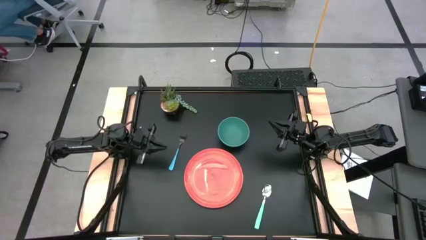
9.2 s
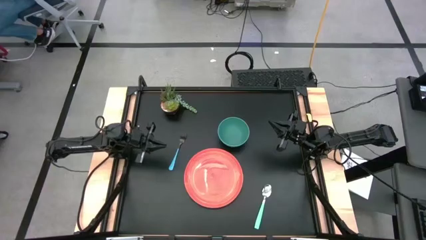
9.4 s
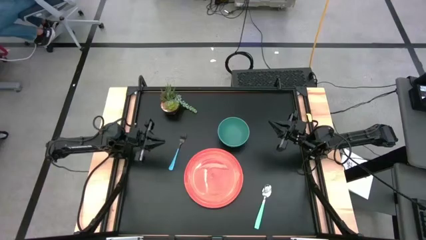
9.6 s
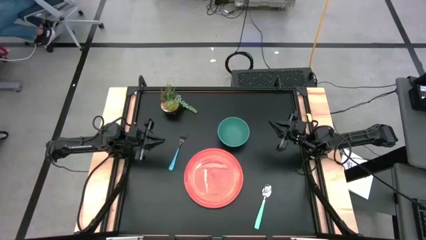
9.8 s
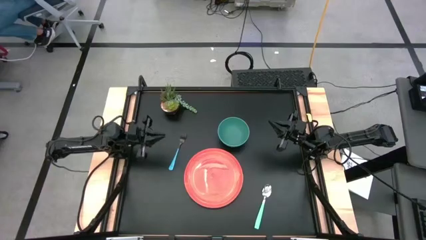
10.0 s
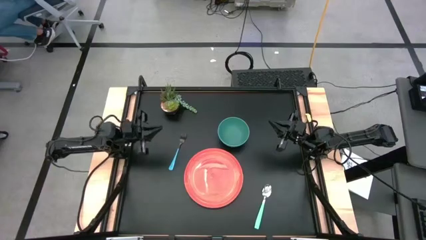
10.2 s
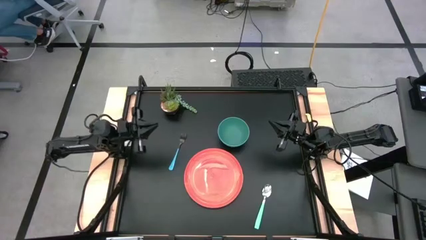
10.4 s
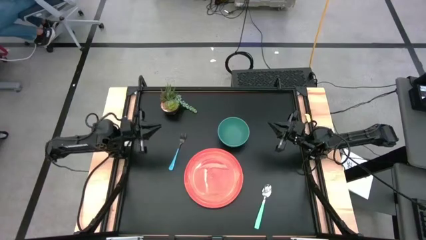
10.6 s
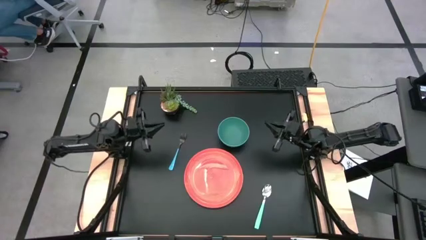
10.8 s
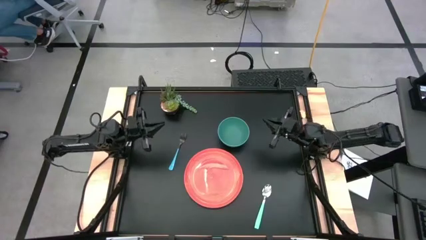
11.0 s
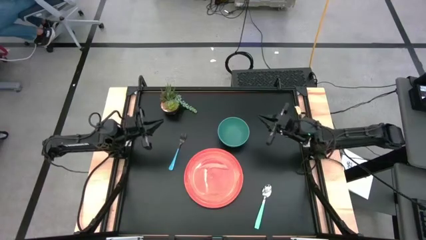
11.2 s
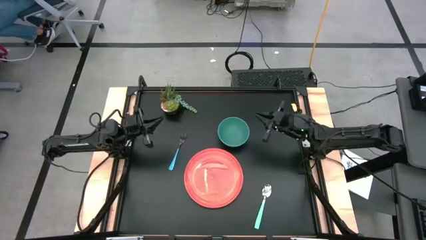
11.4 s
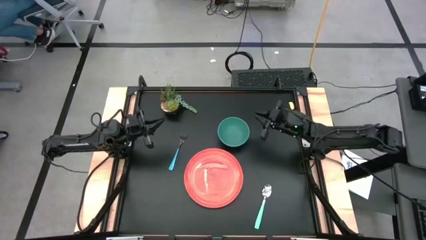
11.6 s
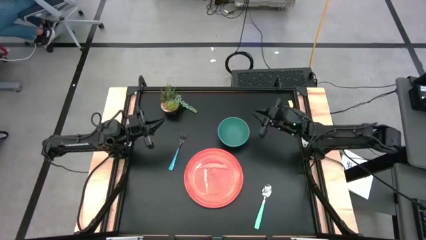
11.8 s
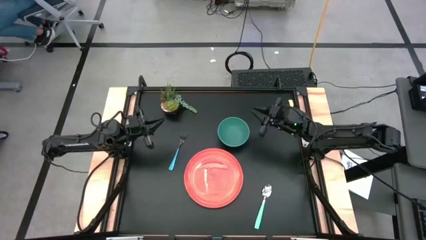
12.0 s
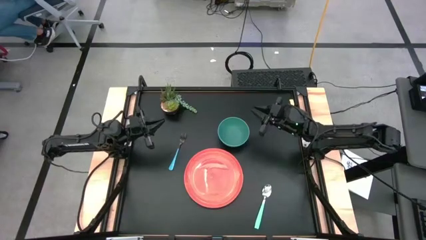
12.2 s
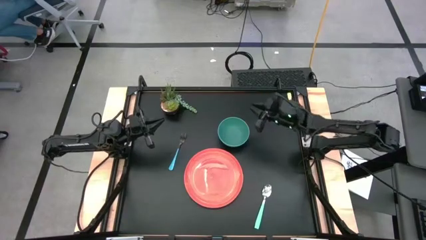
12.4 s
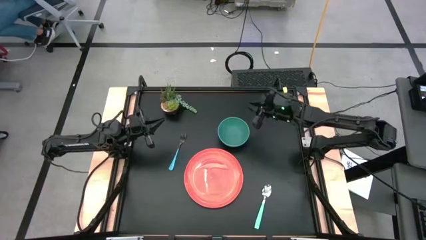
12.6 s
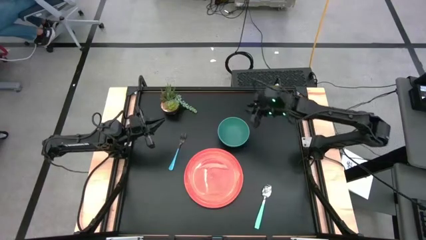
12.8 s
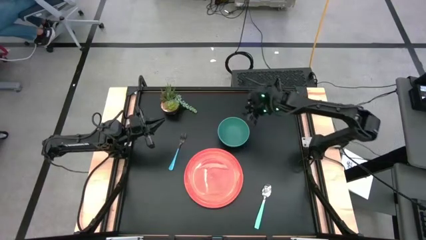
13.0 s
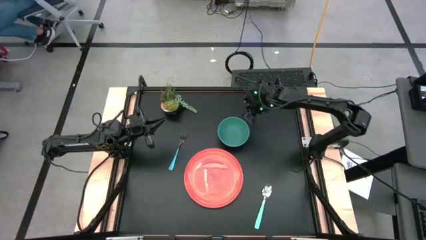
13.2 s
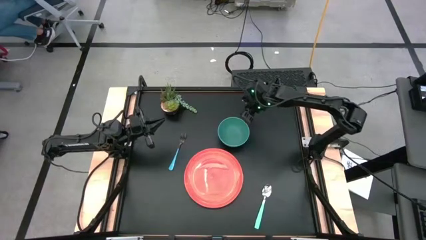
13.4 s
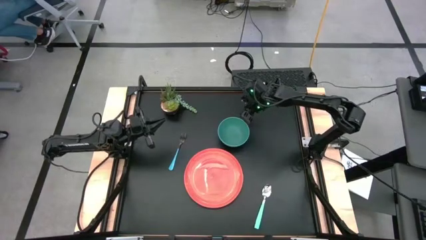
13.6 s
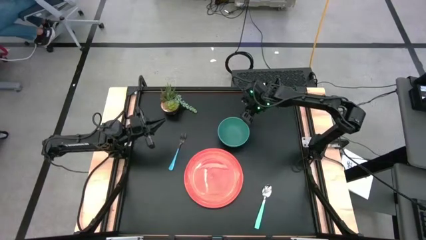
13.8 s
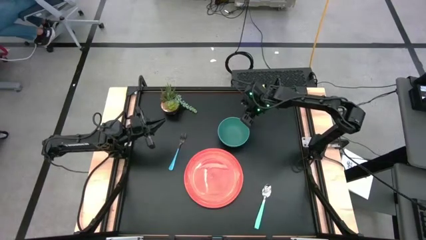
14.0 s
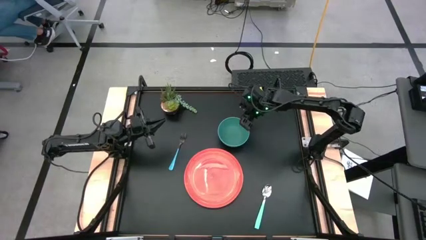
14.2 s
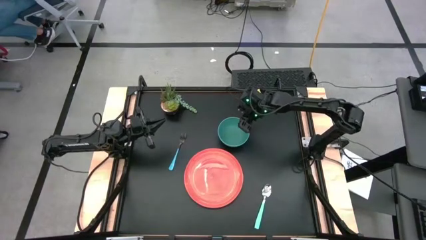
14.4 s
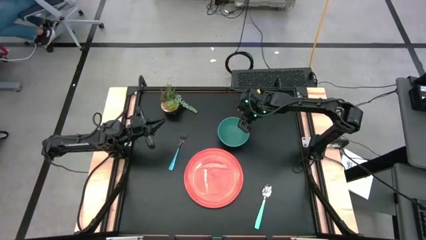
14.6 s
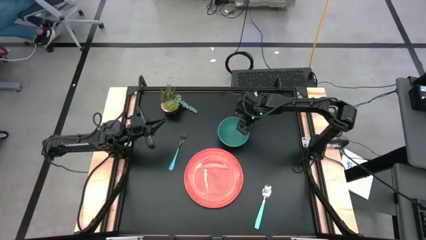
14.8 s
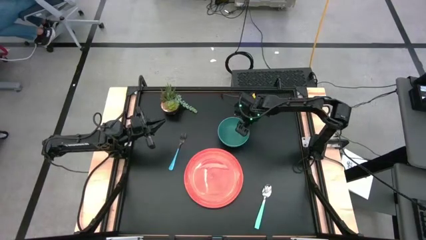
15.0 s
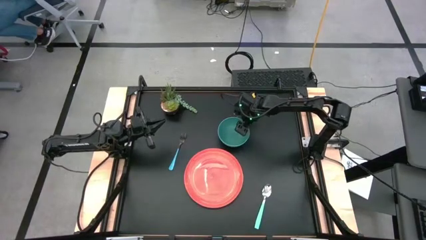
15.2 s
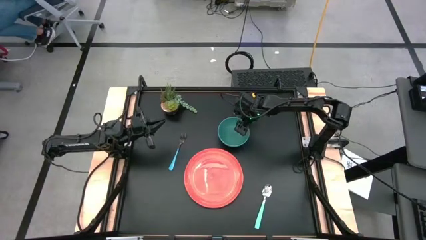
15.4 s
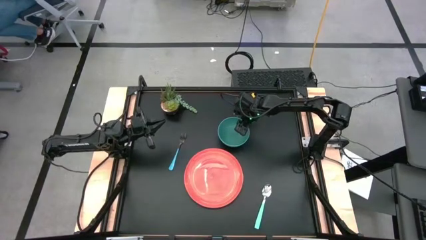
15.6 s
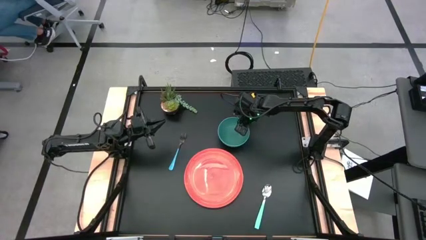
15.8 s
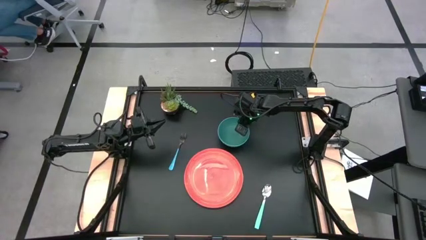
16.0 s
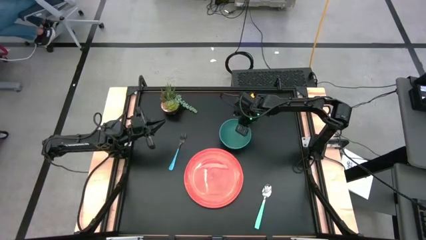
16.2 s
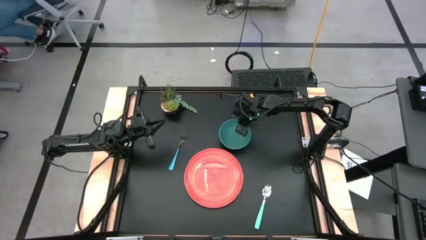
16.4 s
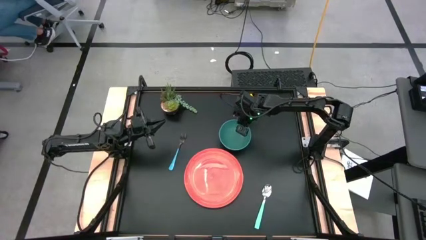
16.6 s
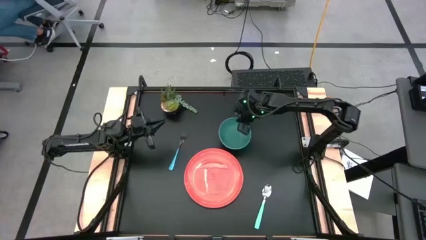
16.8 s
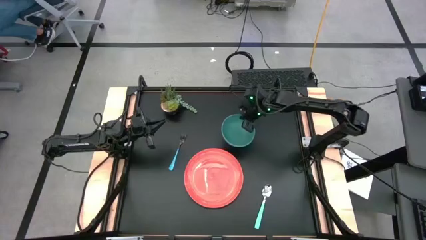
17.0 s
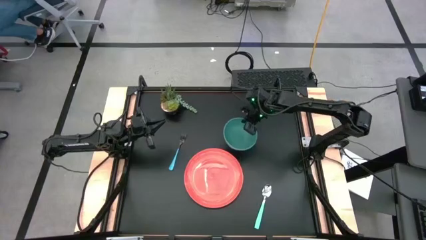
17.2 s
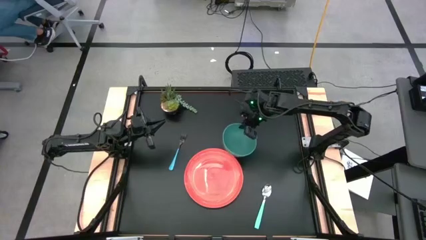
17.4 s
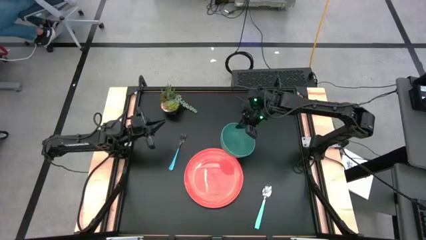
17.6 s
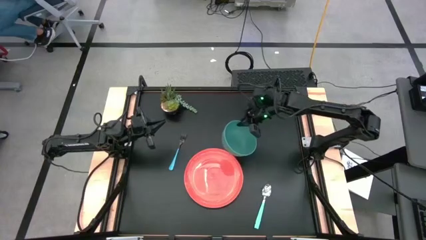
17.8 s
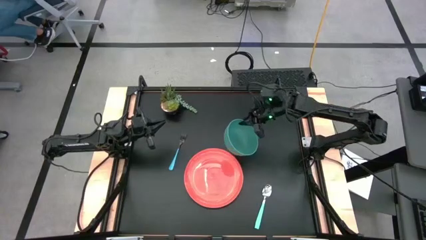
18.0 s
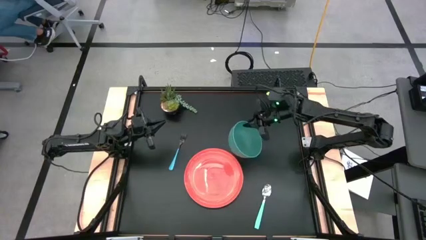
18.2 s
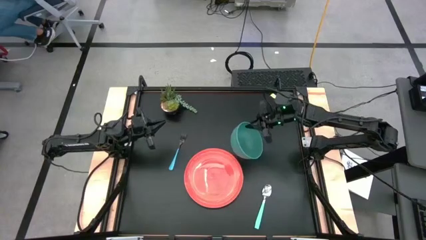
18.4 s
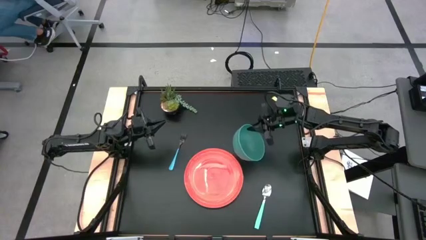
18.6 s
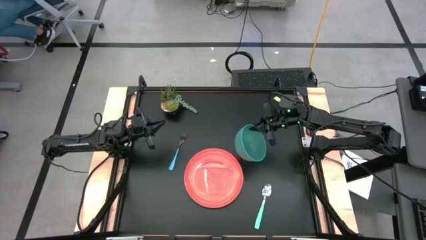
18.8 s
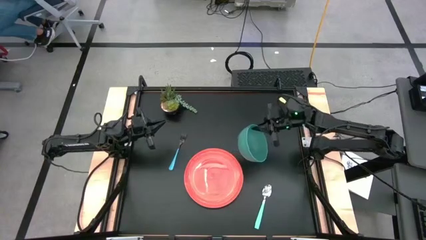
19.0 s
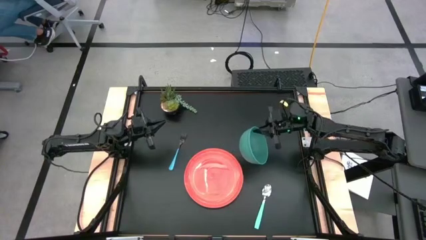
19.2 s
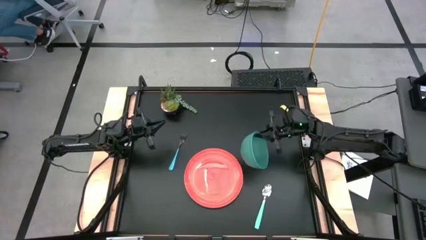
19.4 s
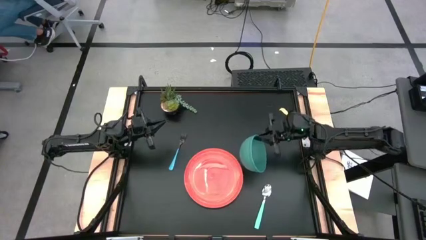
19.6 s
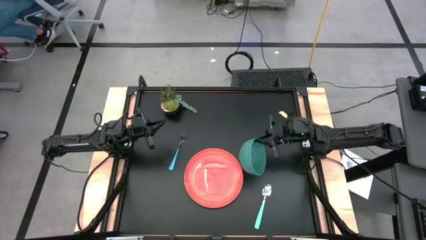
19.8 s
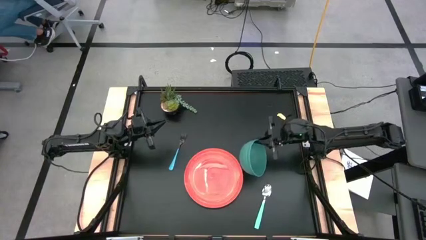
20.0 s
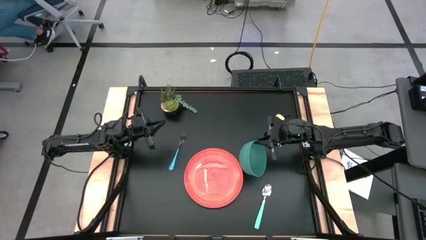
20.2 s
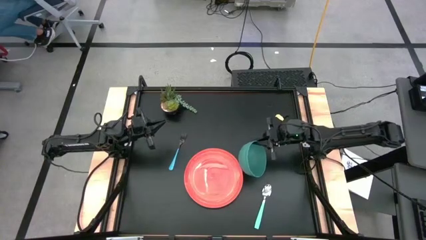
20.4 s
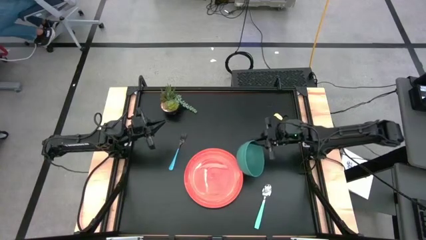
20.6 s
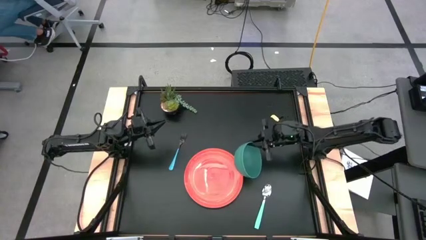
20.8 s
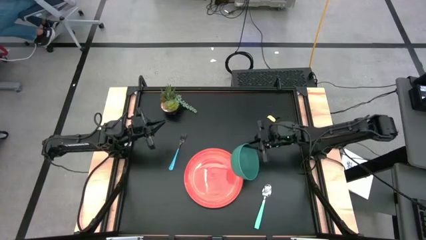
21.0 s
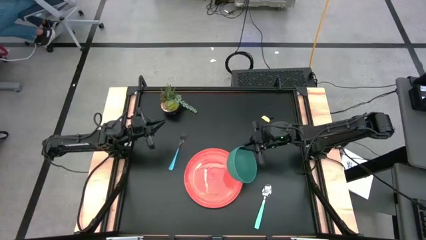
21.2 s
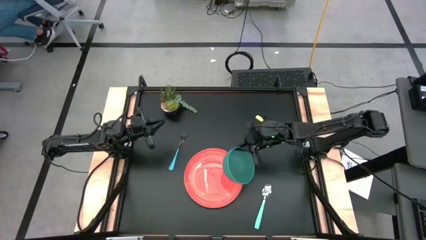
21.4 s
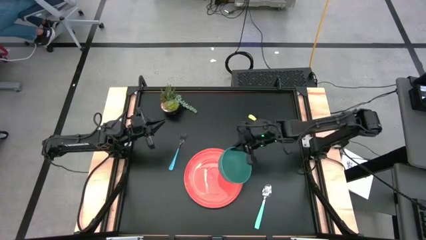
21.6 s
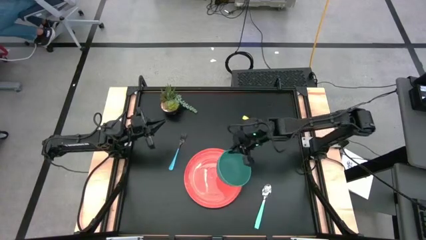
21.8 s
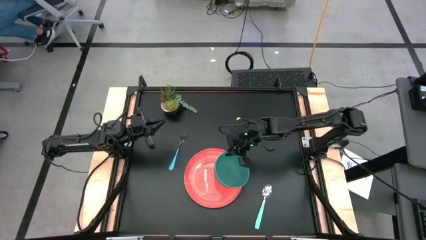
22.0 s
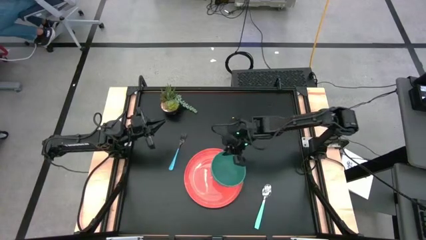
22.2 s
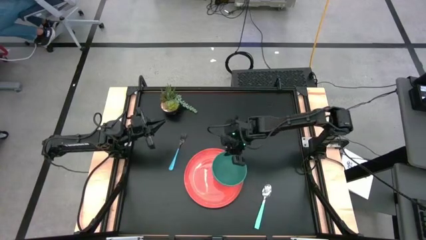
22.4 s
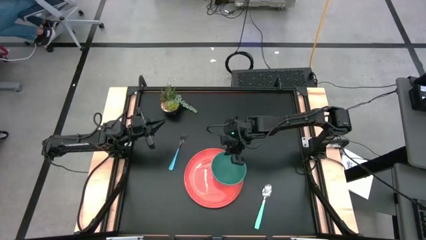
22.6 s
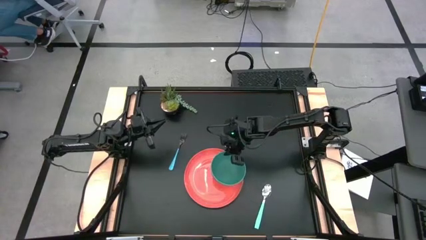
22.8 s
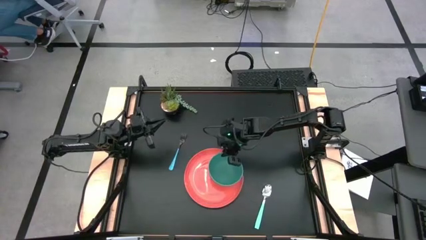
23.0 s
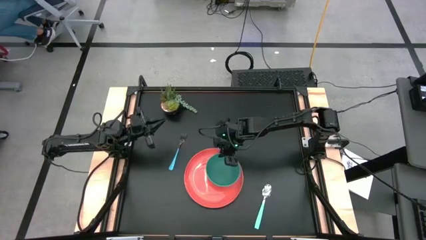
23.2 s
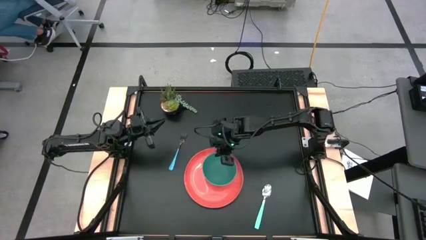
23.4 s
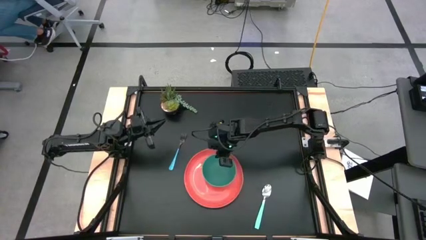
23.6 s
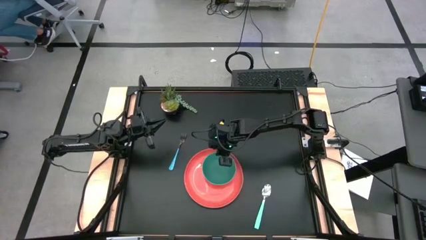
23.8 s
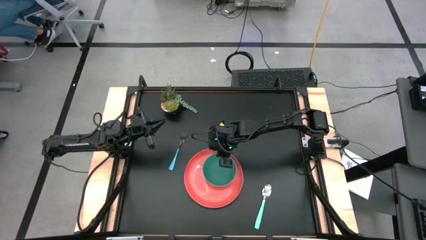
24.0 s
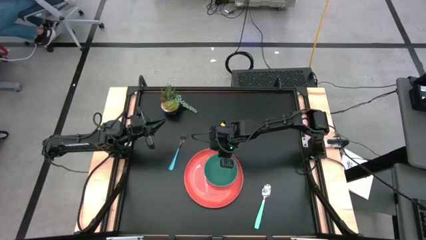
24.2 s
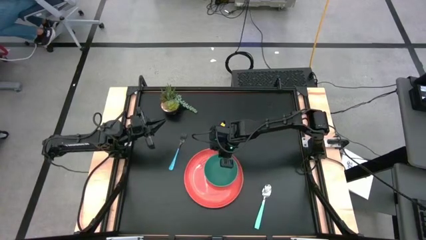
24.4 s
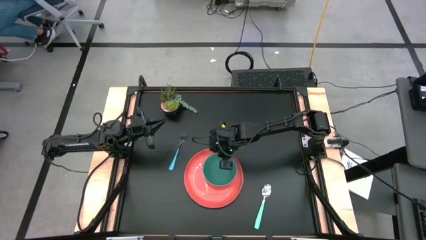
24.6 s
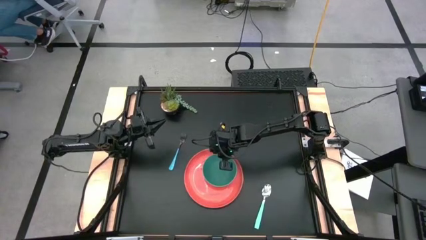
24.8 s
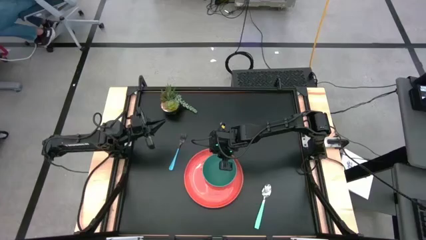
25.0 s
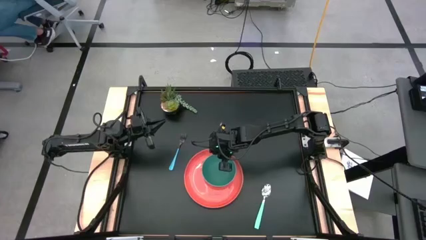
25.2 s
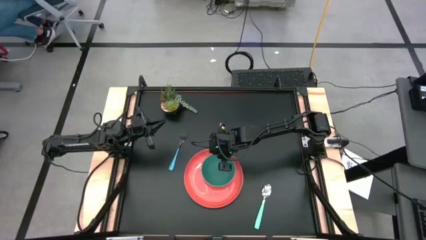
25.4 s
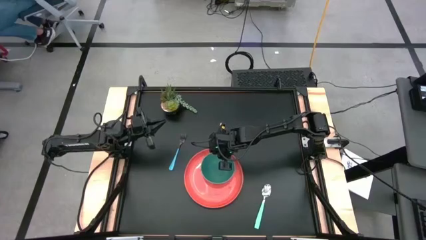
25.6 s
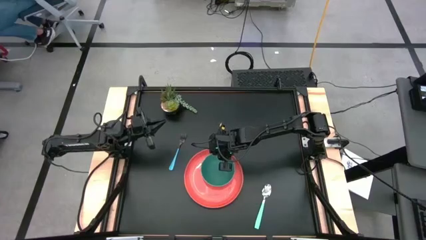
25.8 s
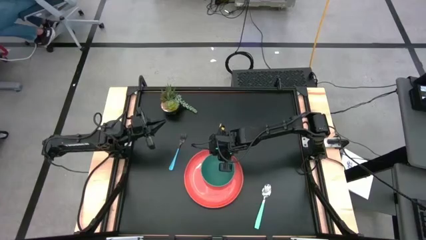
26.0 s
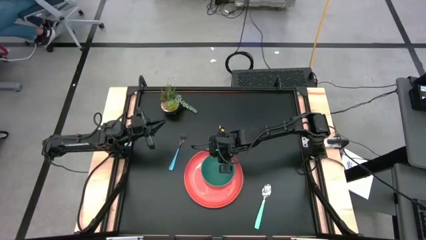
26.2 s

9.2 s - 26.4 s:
Task: Set table place
Put the green bowl on the orange plate
